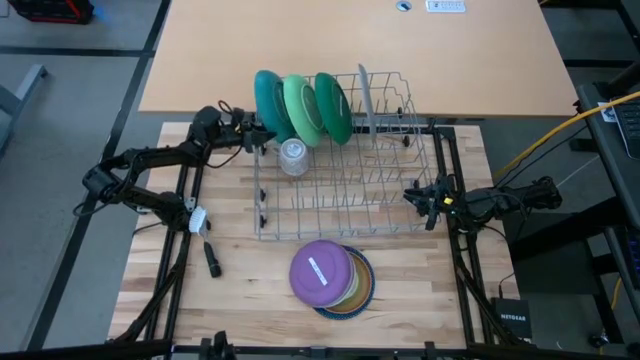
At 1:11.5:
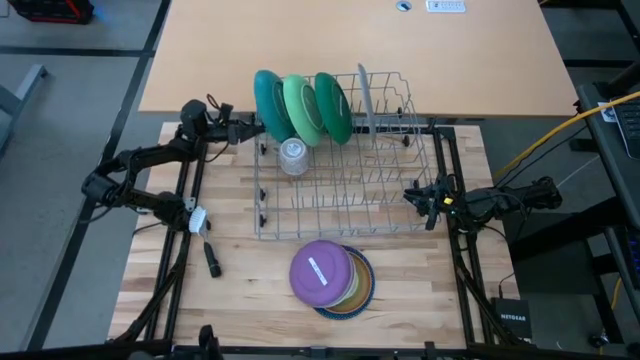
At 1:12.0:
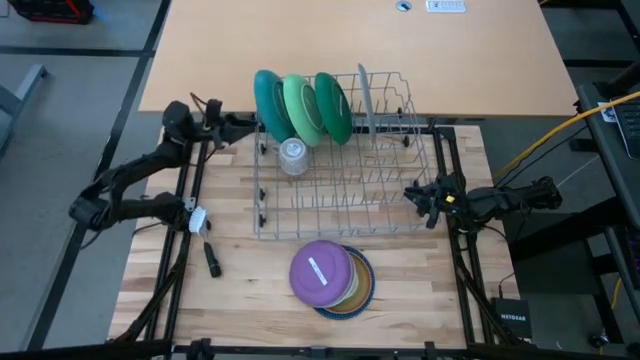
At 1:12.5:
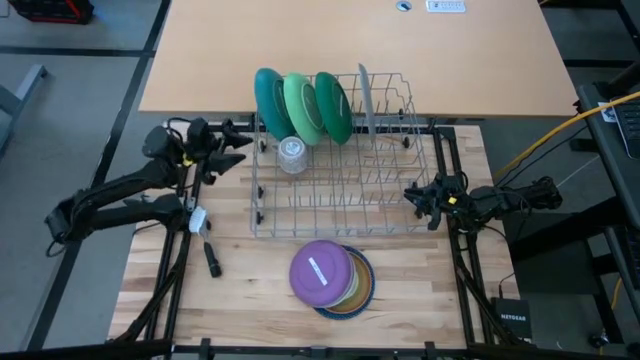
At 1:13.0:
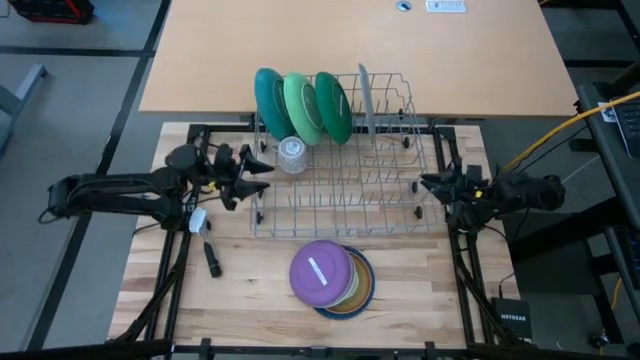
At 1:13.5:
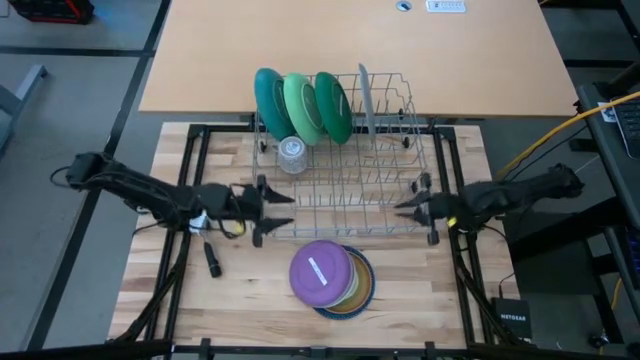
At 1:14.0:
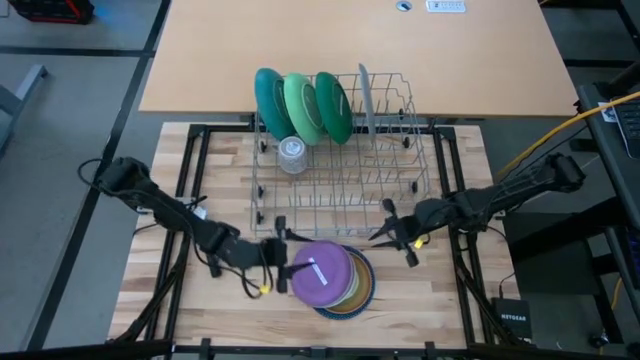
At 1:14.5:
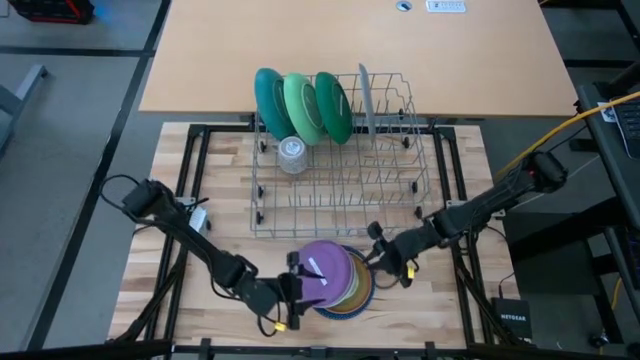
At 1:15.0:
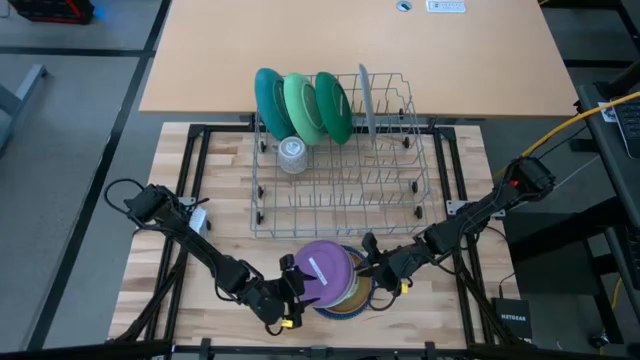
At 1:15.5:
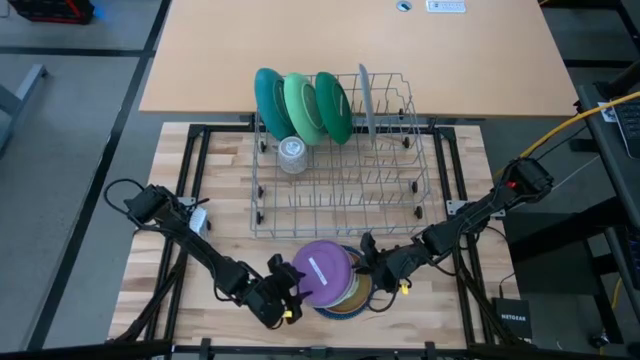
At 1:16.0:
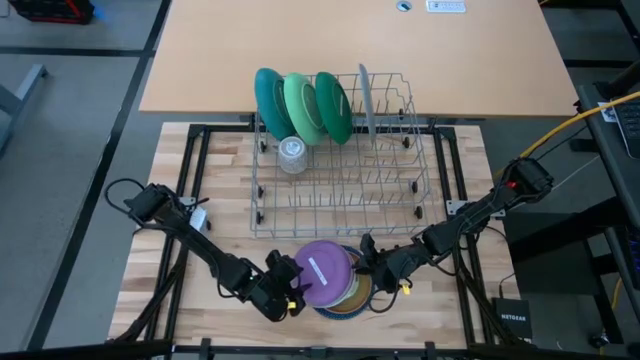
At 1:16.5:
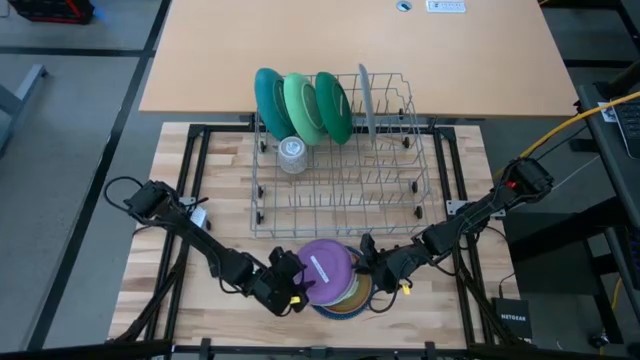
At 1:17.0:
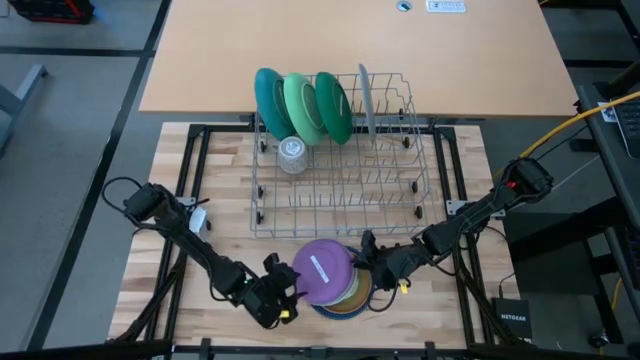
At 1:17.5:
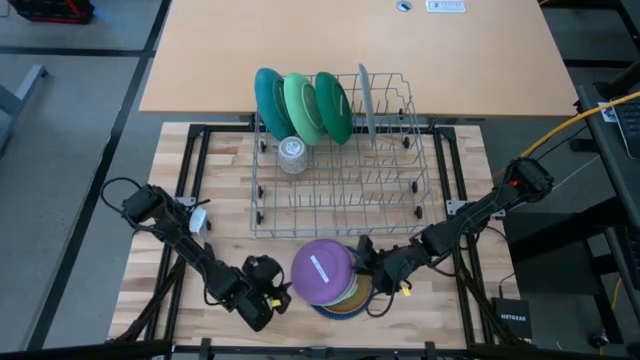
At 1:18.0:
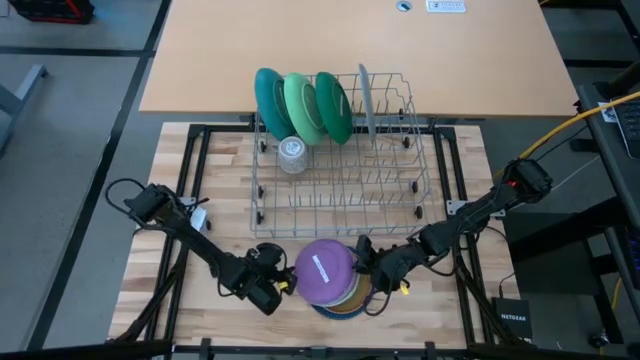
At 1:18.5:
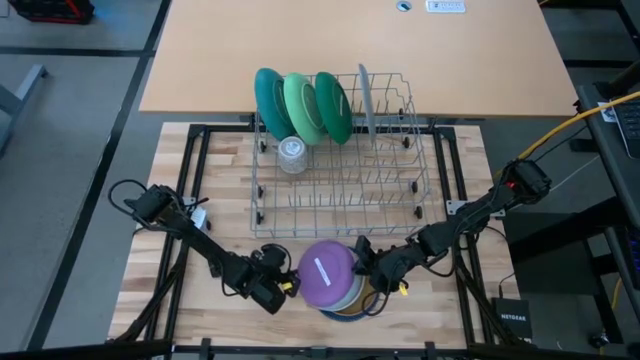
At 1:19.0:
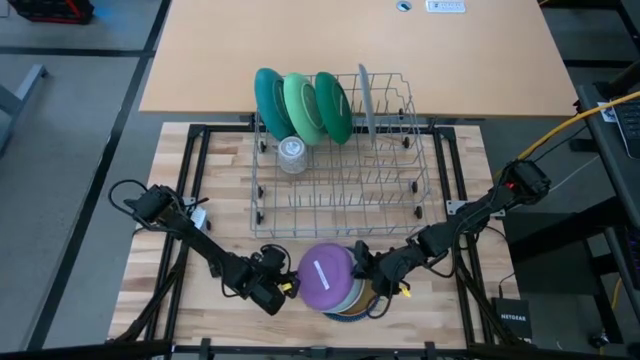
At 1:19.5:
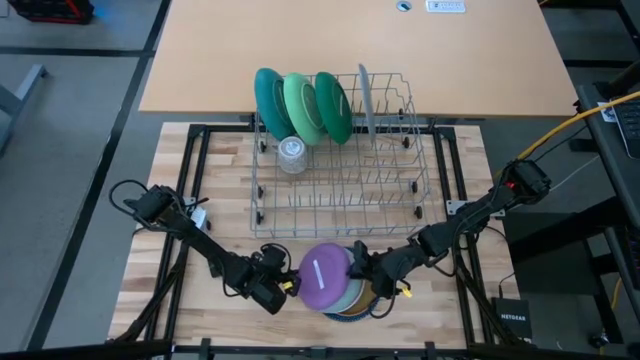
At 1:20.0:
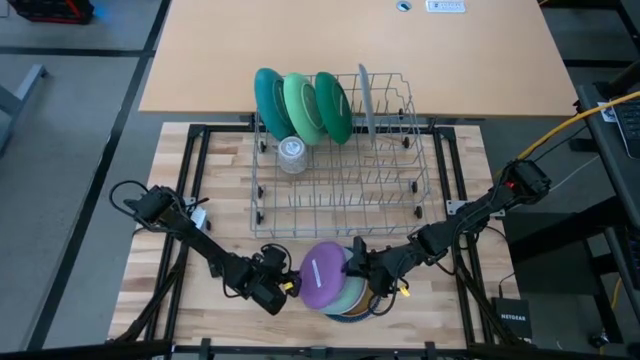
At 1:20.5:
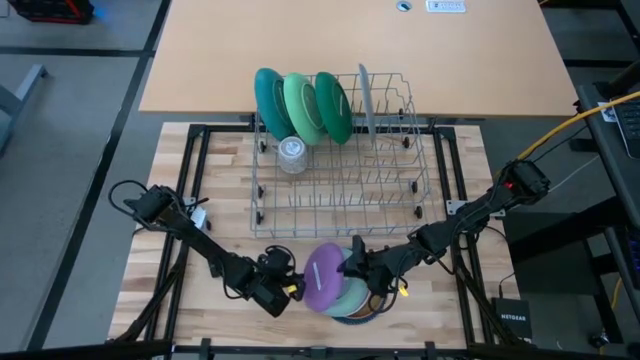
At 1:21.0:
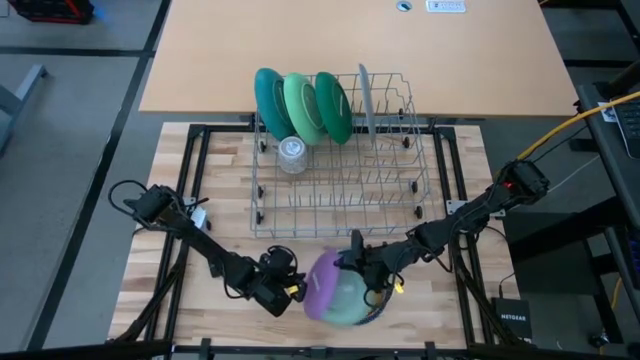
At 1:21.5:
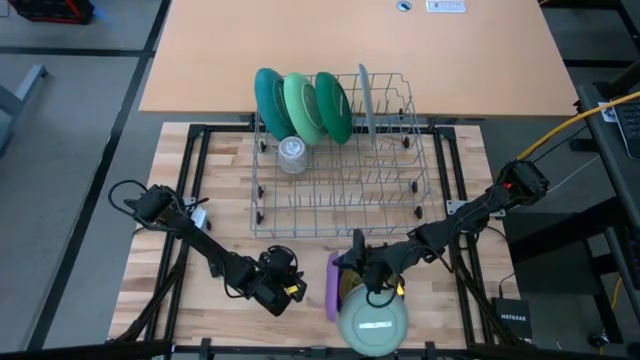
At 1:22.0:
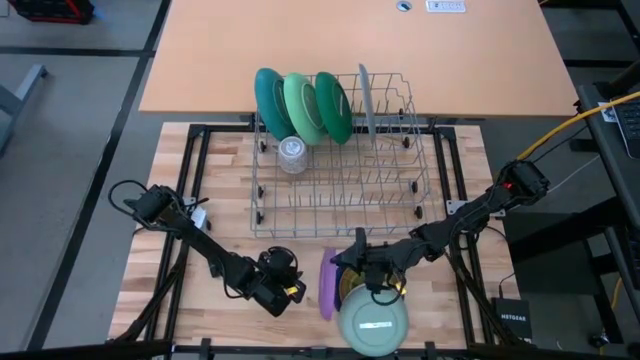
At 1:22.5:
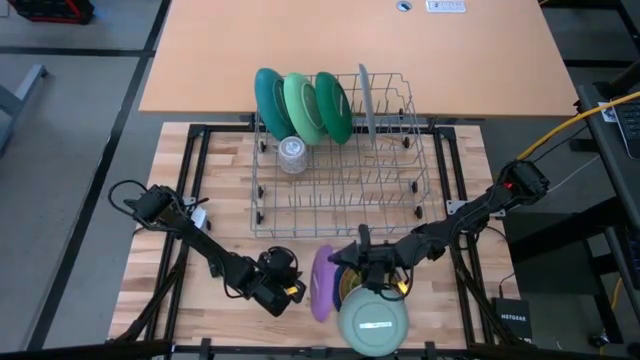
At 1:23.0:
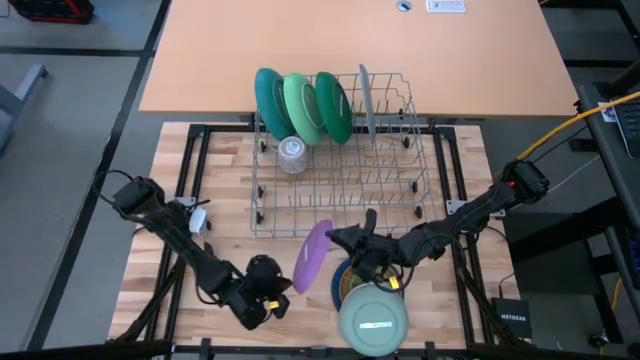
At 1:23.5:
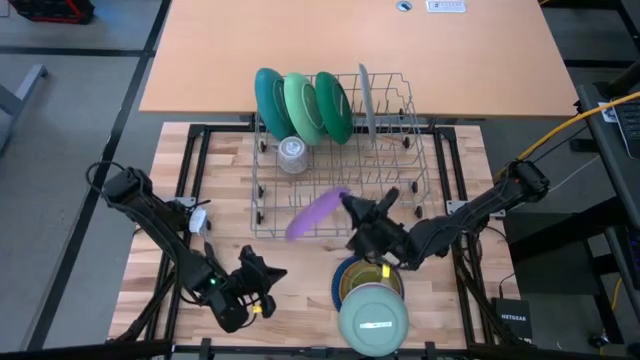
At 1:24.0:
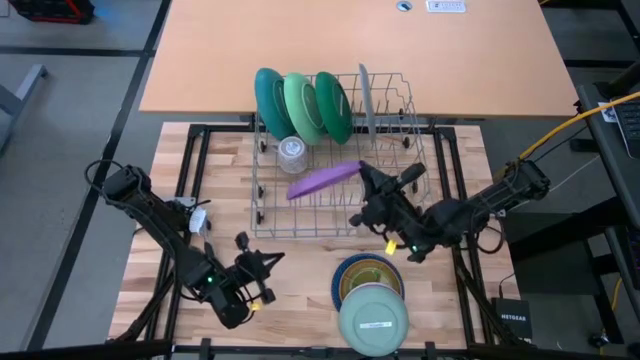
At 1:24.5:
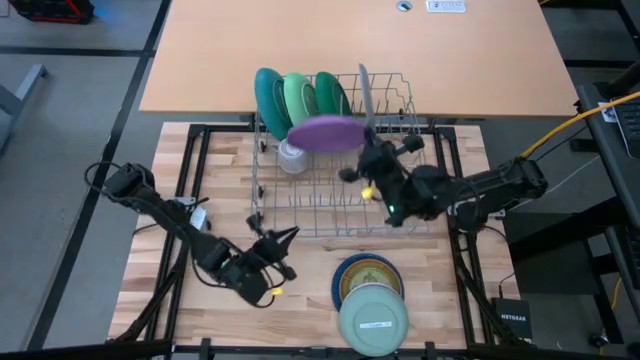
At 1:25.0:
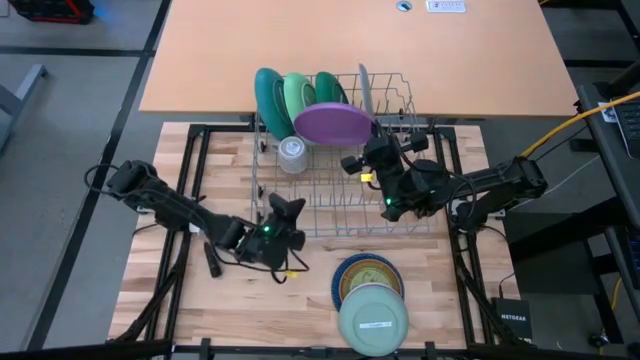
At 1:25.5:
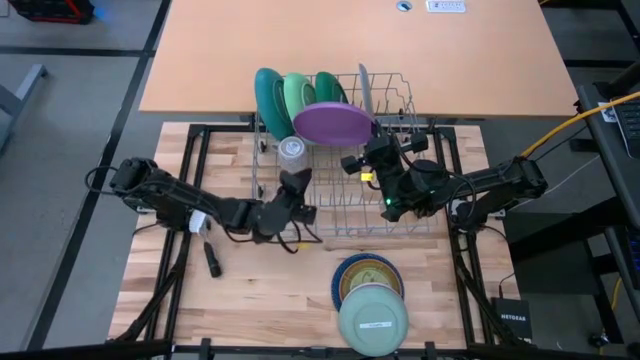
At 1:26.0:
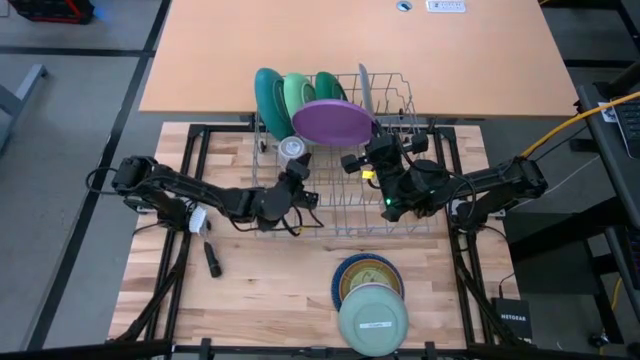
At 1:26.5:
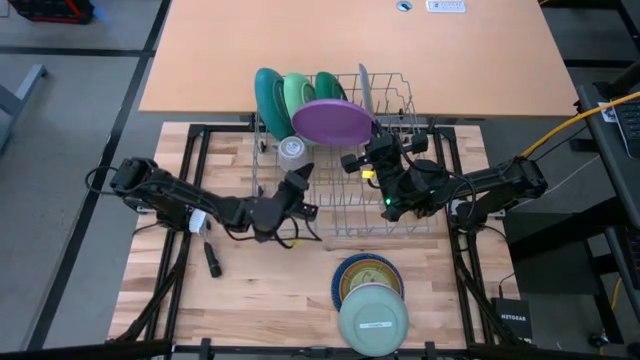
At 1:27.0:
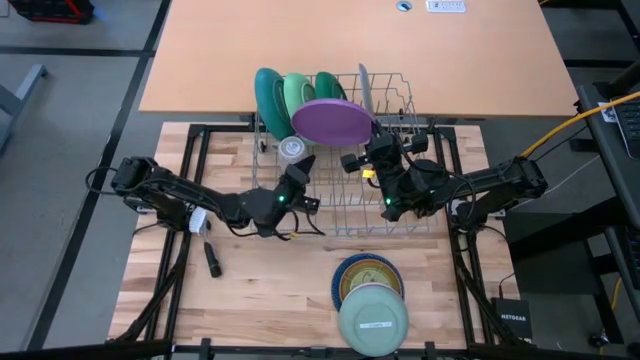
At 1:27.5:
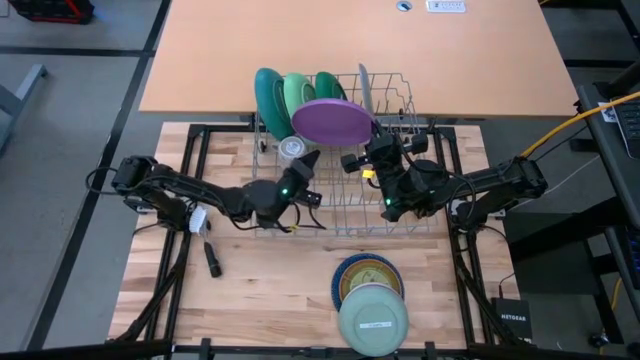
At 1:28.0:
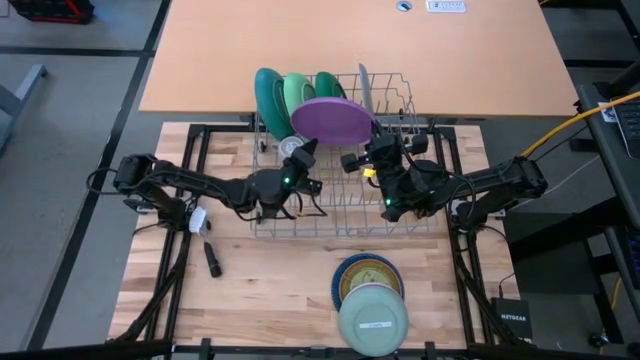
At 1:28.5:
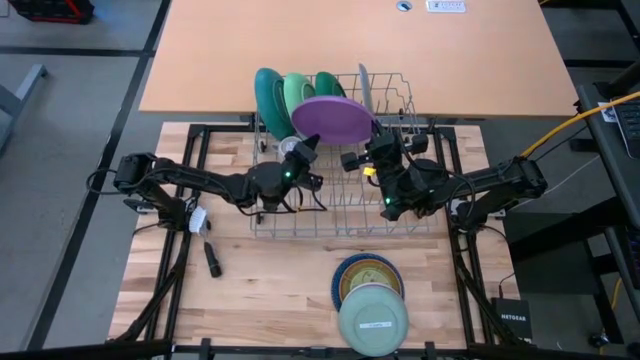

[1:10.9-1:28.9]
Task: Sort dishes
Put the purple plate in the dish rack

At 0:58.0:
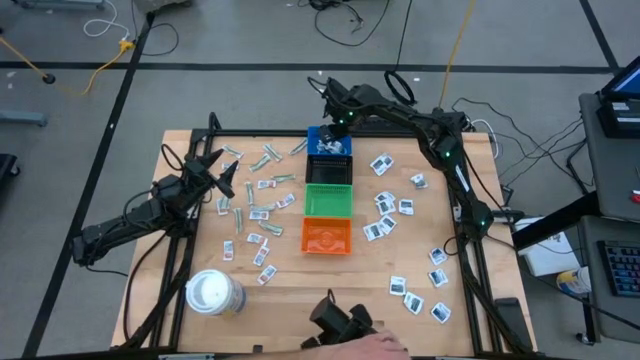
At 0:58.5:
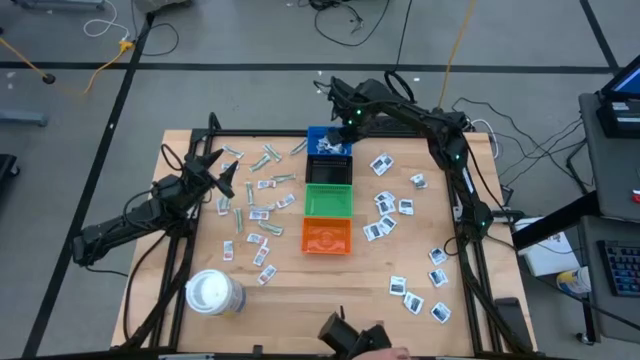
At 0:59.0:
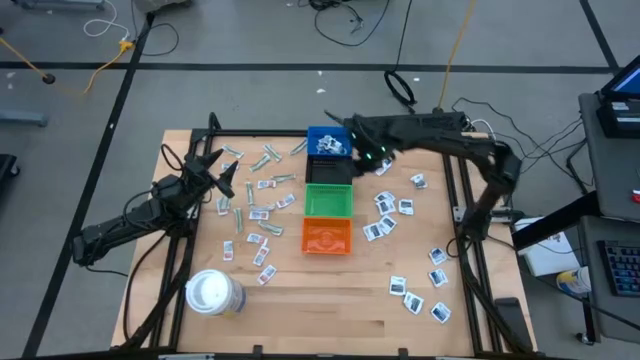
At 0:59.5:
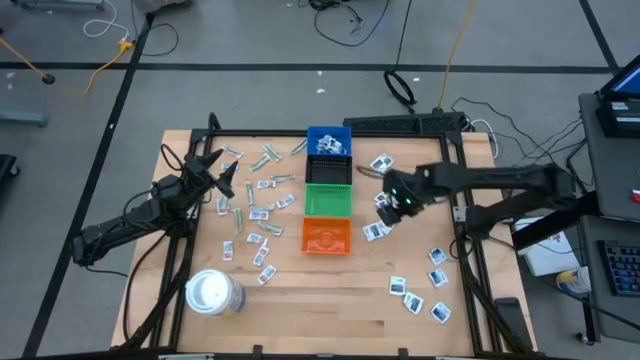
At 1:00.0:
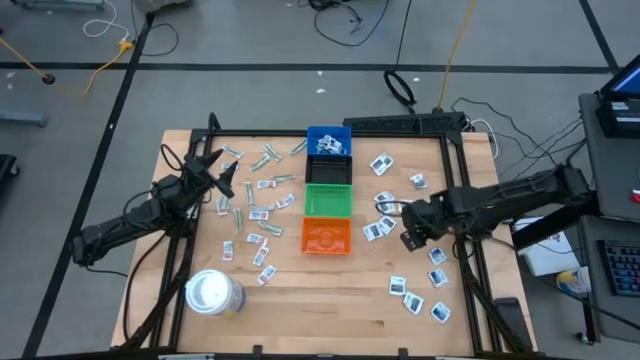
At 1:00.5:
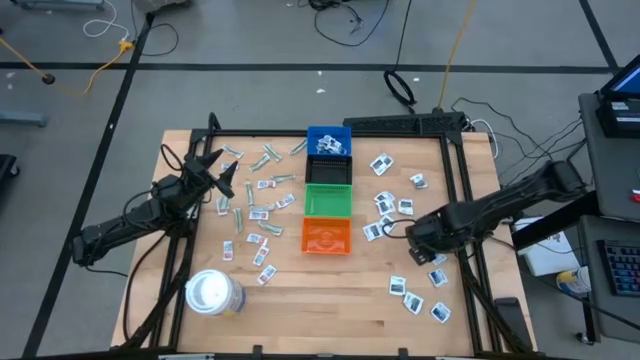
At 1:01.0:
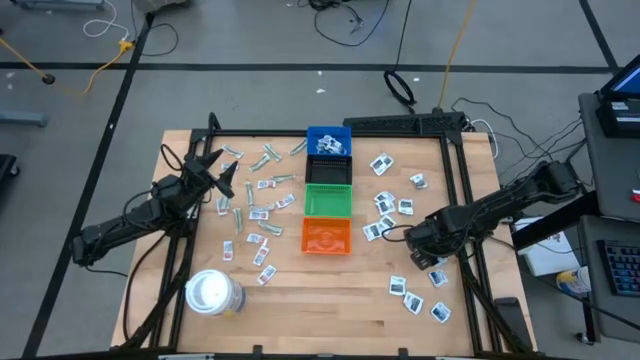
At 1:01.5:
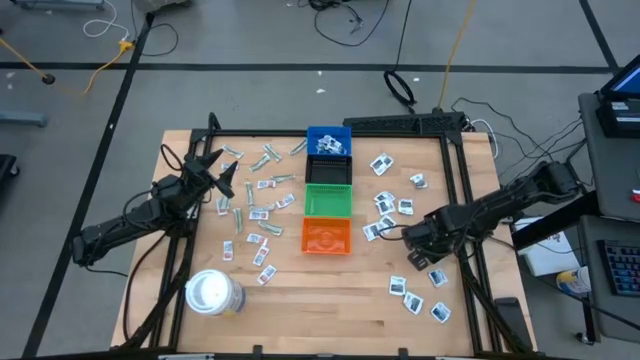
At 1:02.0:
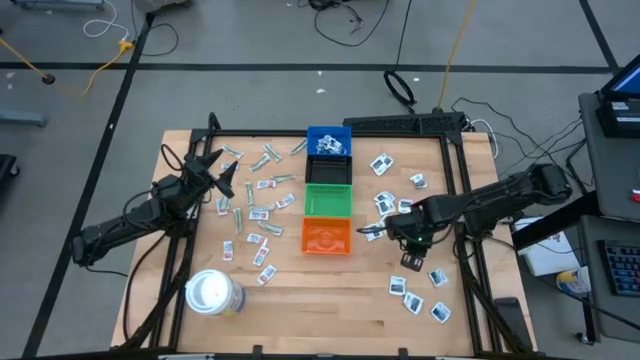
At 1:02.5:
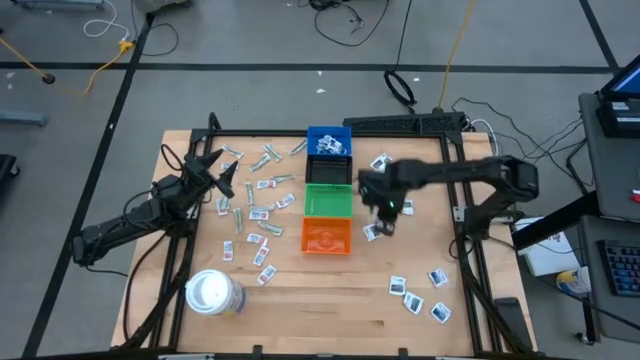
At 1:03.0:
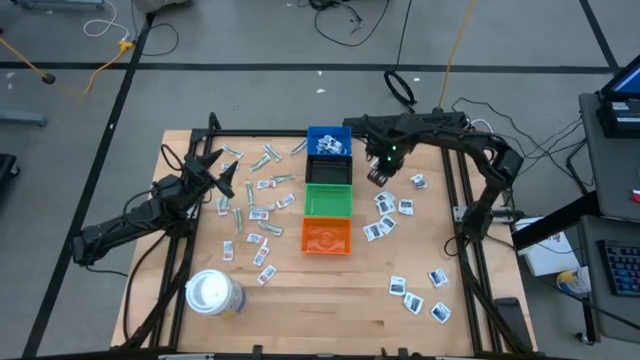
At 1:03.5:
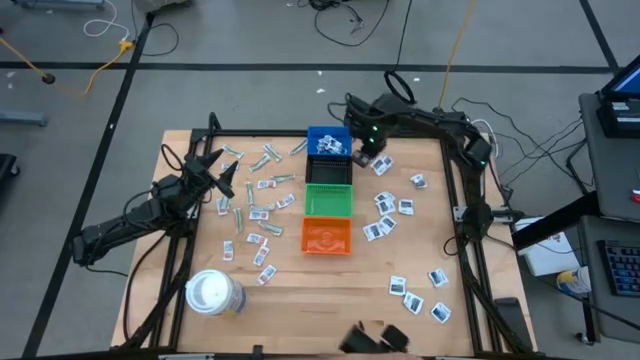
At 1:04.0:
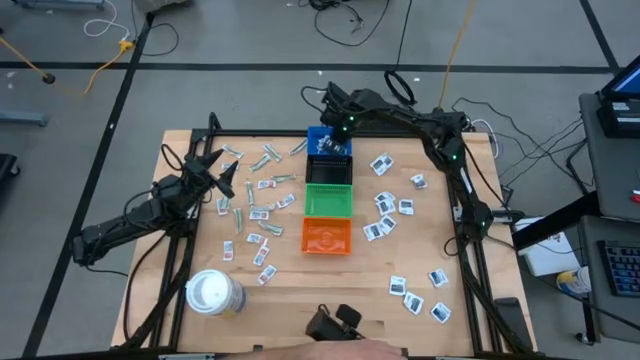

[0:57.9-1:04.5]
Task: Pick & Place First Aid Supplies
Put the blue alcohol pad into the blue bin
